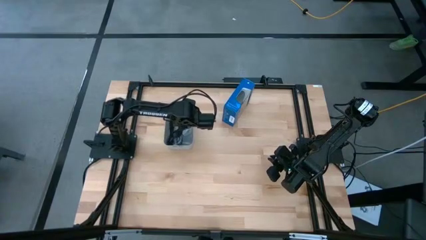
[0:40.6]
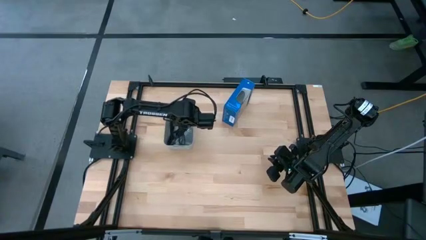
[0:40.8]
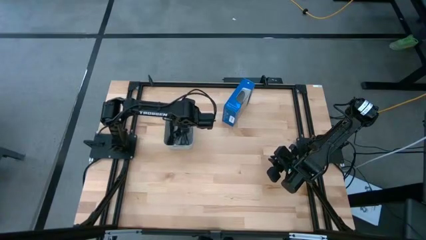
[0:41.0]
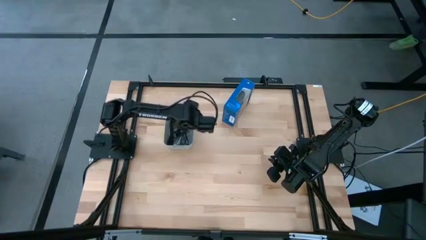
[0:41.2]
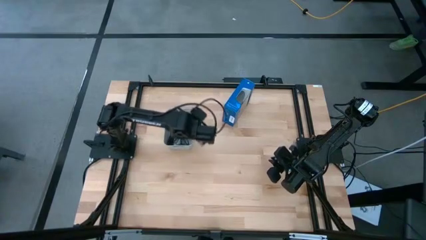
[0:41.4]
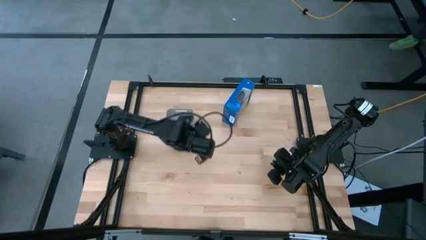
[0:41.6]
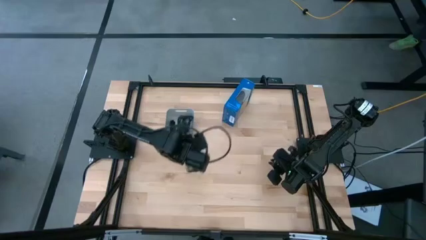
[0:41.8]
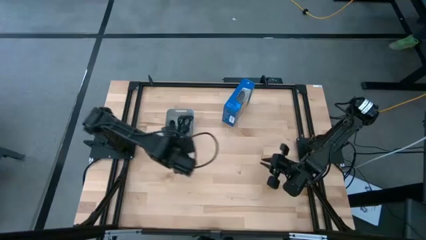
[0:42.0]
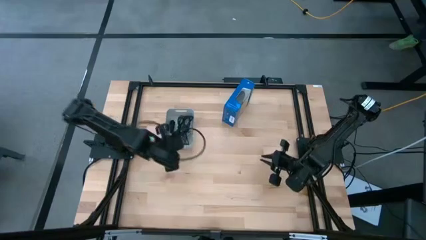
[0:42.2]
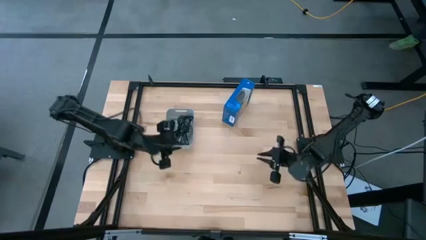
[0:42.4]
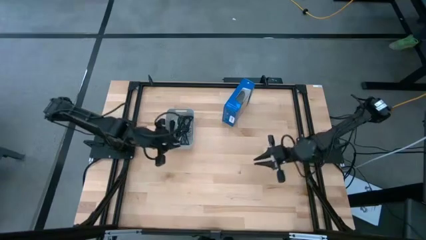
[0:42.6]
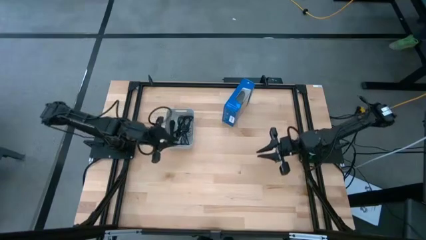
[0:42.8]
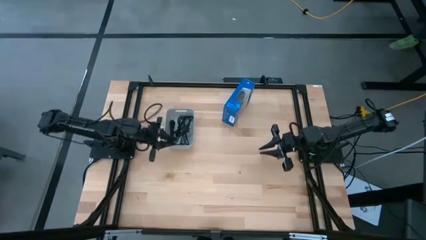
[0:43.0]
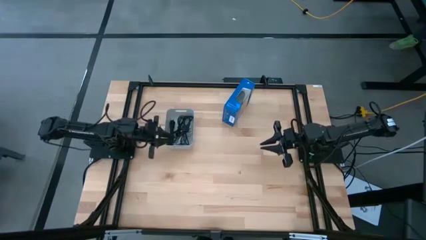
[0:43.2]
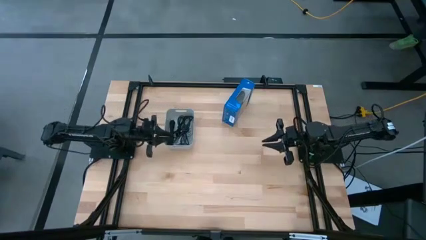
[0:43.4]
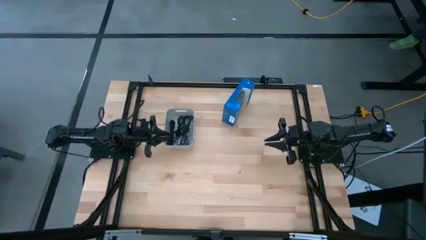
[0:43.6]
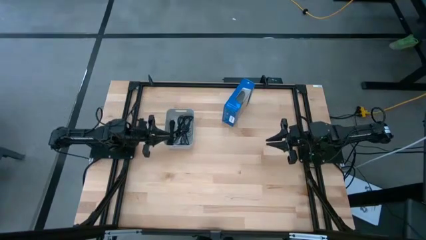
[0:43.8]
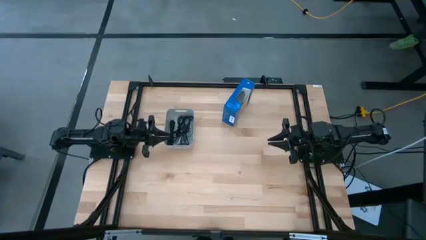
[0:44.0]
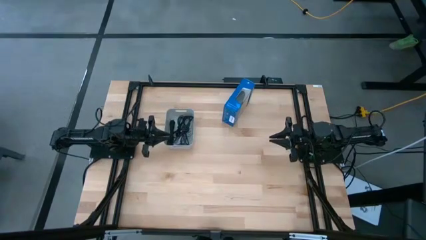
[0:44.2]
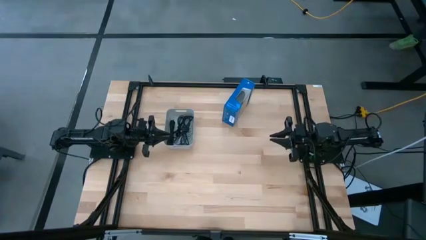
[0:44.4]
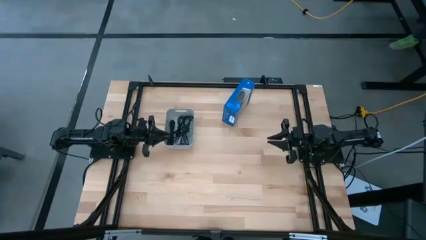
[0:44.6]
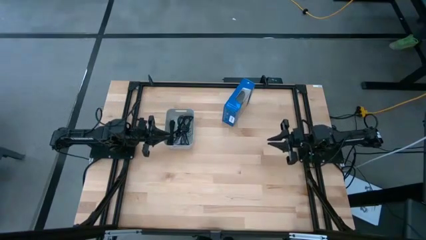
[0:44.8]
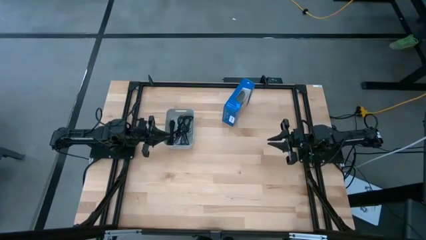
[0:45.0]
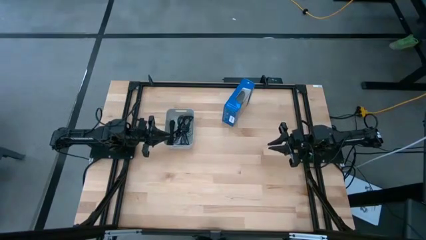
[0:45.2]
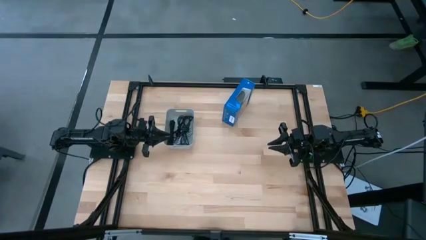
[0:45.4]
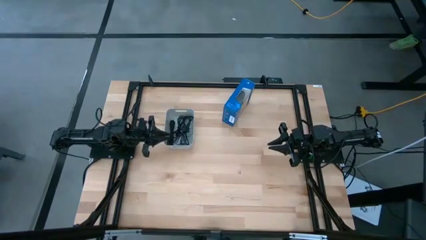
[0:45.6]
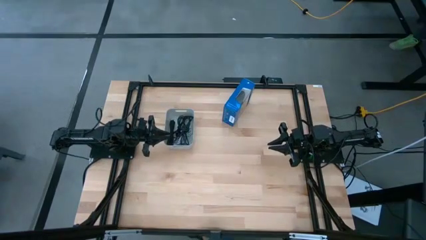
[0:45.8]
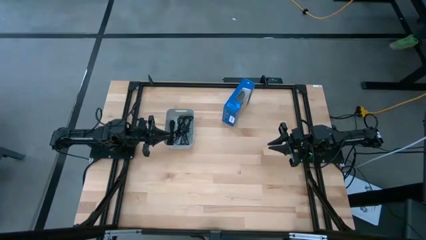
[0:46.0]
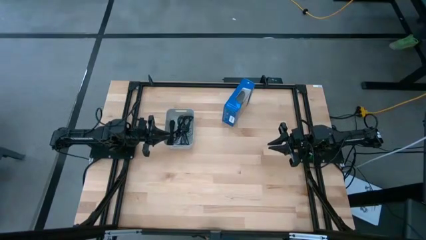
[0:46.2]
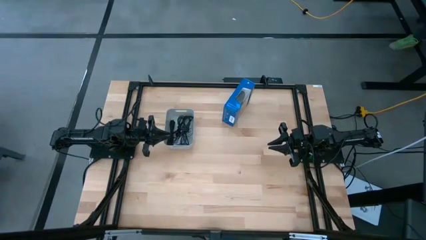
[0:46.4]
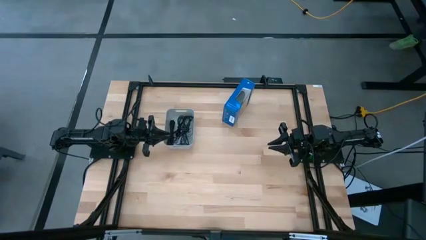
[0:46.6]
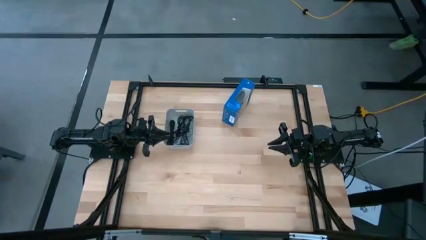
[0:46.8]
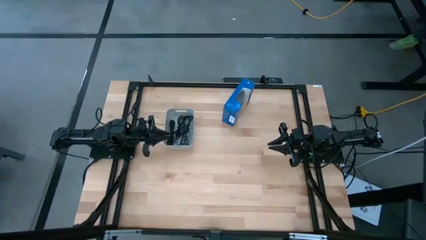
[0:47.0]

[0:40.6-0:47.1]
Task: Pick and place USB-C Cables
Return to Home Position

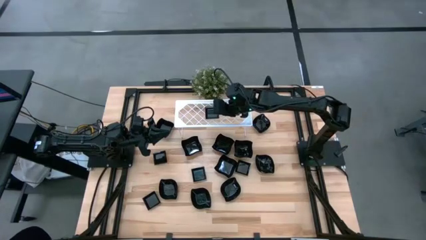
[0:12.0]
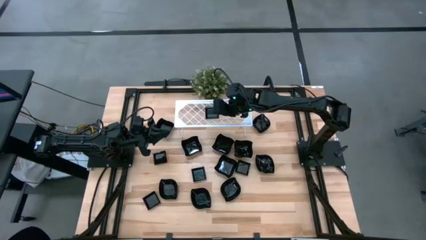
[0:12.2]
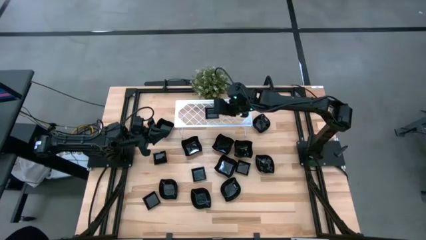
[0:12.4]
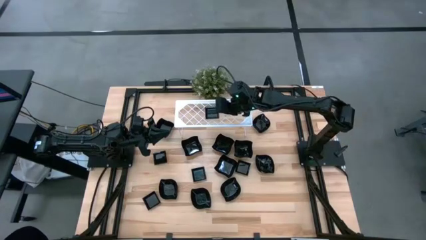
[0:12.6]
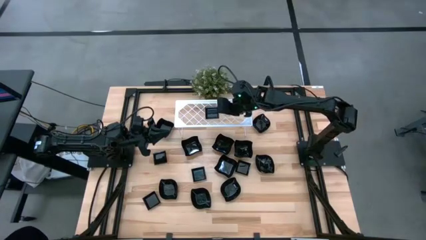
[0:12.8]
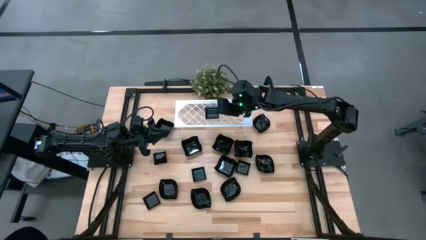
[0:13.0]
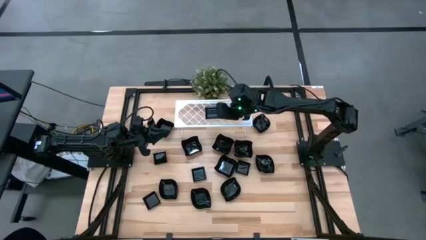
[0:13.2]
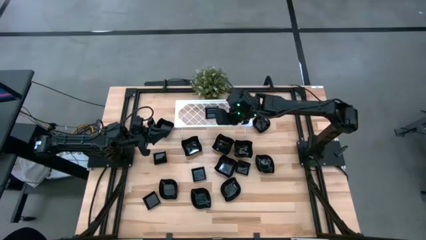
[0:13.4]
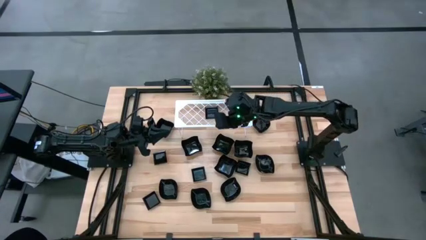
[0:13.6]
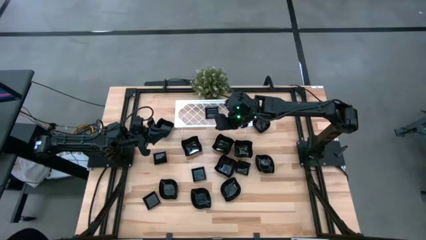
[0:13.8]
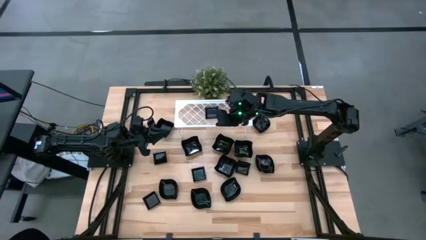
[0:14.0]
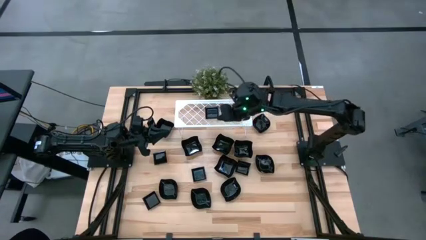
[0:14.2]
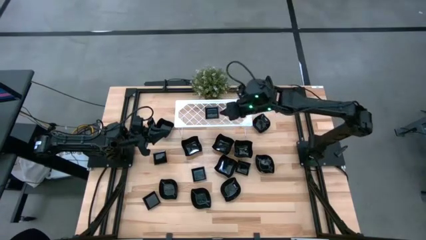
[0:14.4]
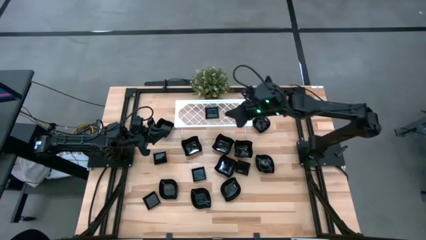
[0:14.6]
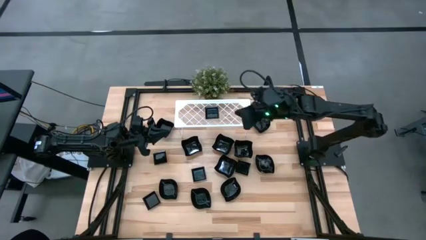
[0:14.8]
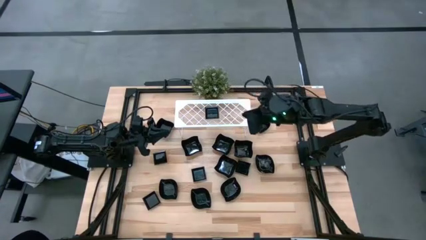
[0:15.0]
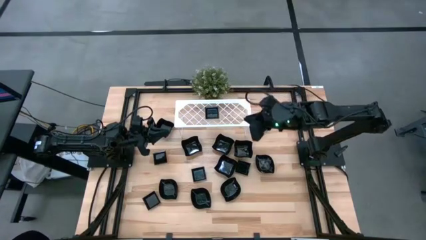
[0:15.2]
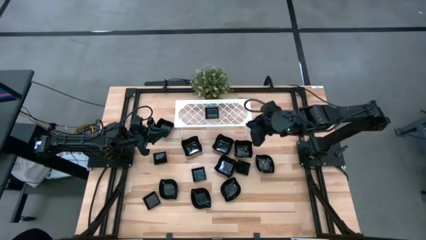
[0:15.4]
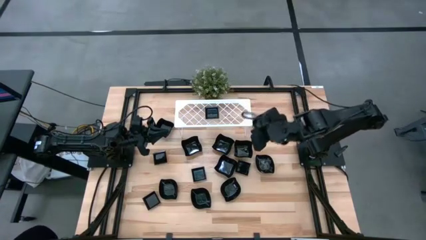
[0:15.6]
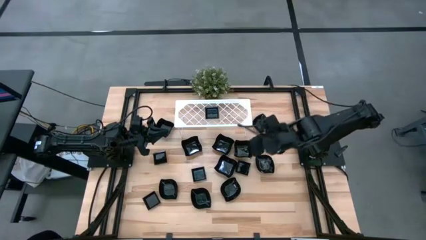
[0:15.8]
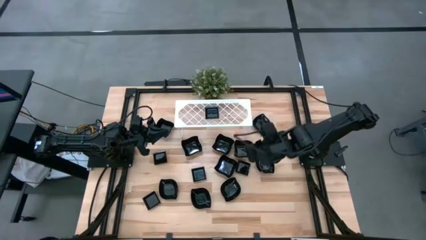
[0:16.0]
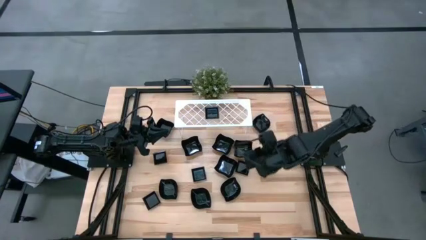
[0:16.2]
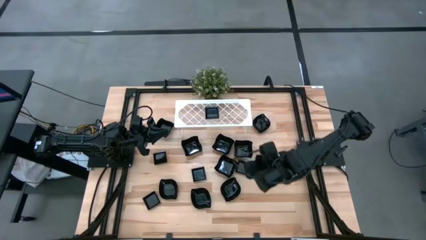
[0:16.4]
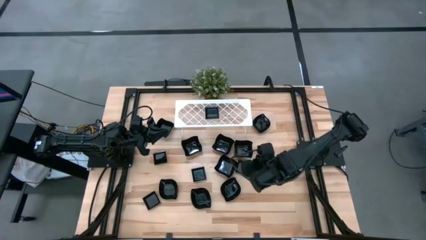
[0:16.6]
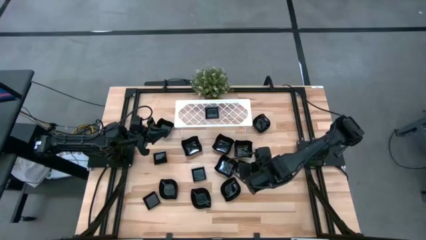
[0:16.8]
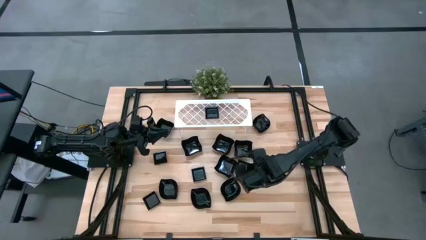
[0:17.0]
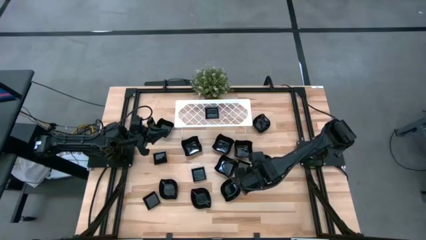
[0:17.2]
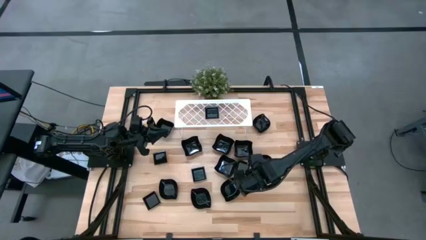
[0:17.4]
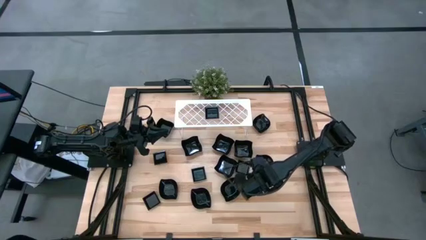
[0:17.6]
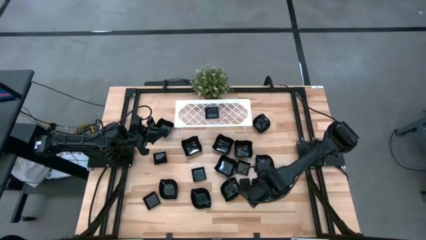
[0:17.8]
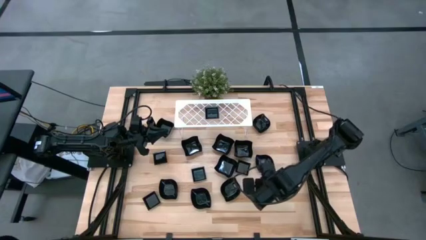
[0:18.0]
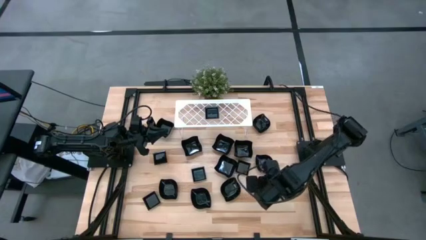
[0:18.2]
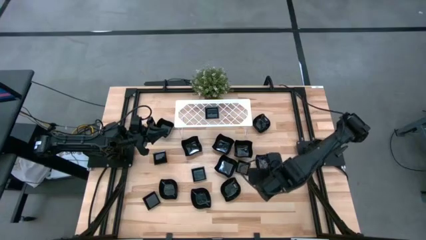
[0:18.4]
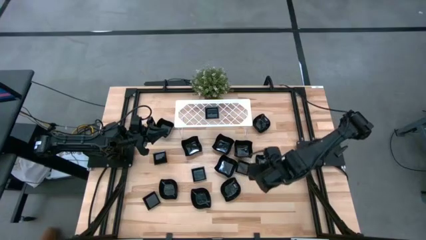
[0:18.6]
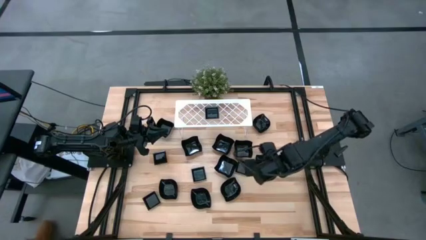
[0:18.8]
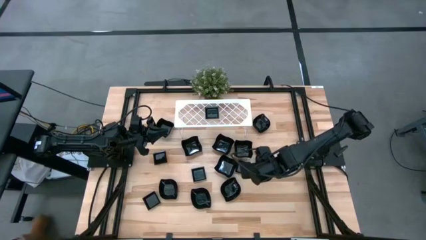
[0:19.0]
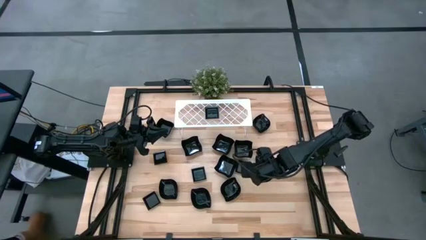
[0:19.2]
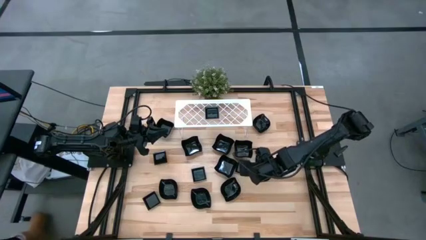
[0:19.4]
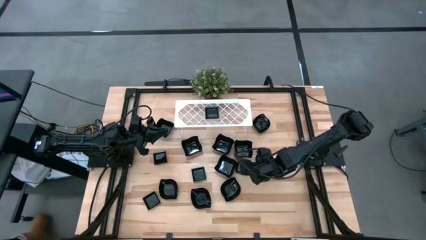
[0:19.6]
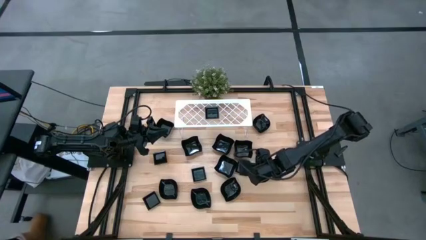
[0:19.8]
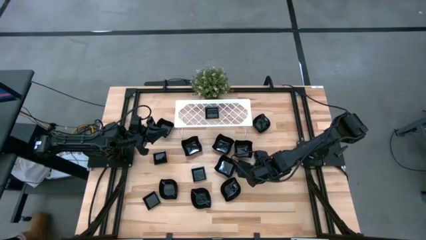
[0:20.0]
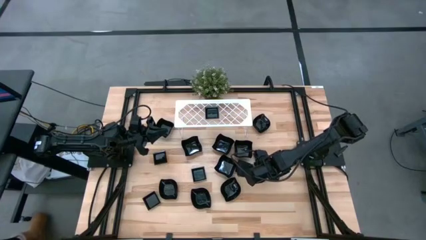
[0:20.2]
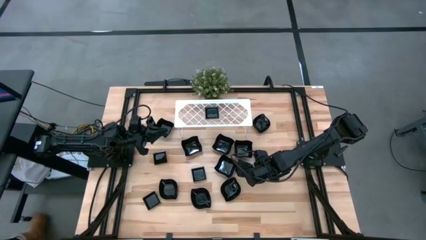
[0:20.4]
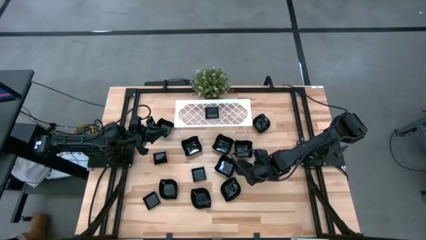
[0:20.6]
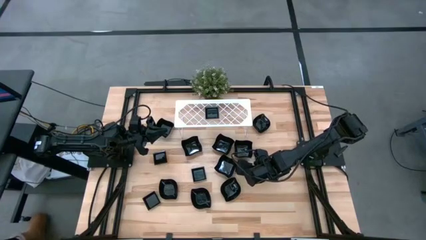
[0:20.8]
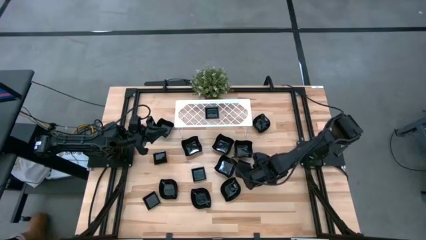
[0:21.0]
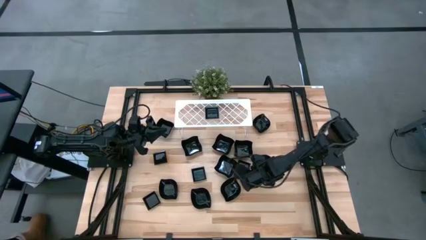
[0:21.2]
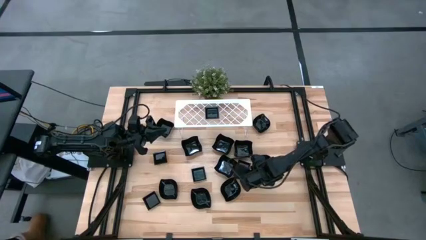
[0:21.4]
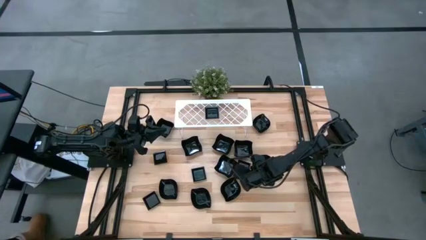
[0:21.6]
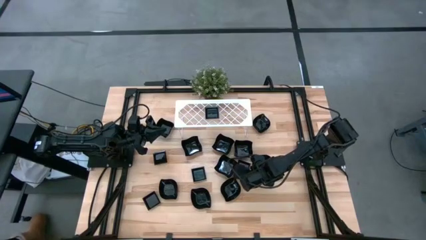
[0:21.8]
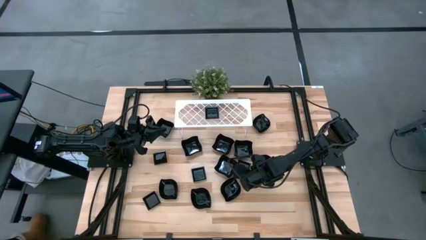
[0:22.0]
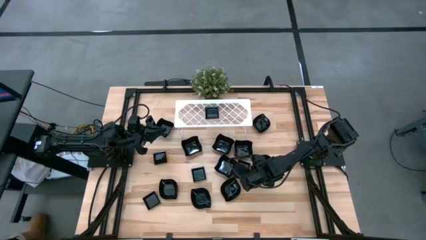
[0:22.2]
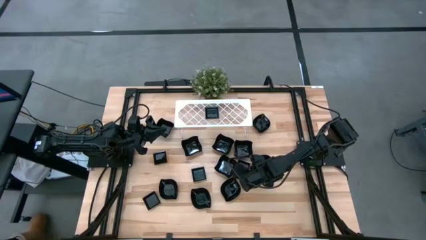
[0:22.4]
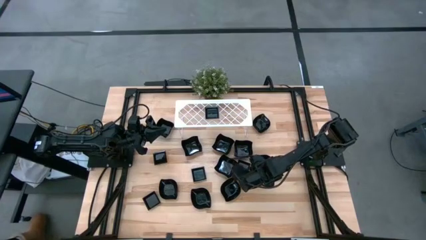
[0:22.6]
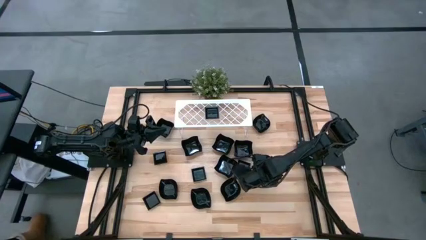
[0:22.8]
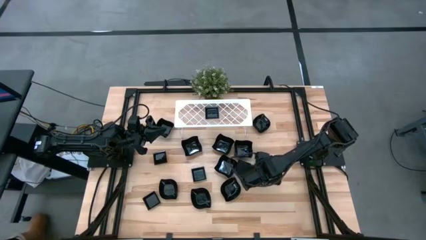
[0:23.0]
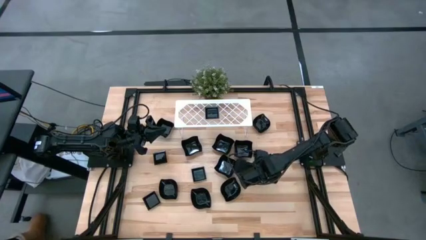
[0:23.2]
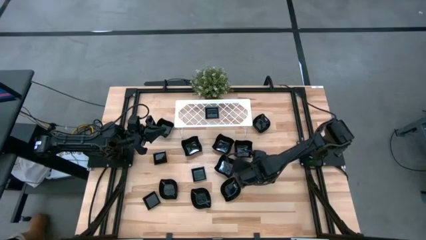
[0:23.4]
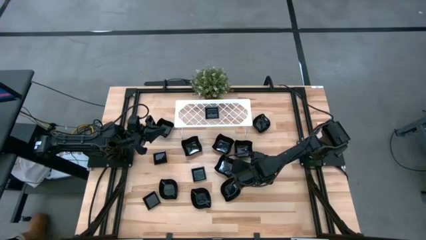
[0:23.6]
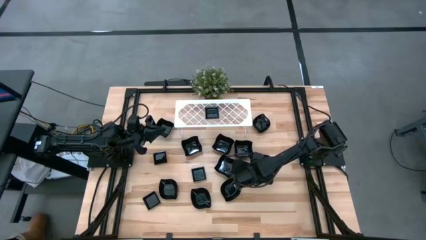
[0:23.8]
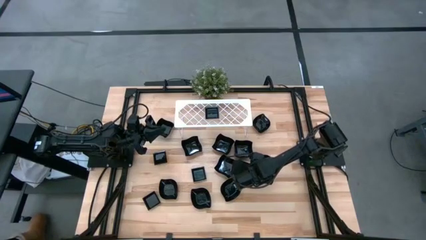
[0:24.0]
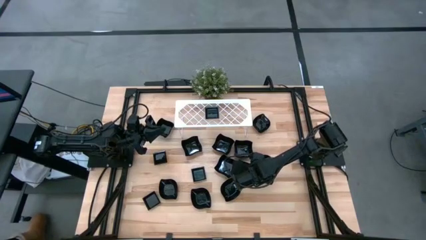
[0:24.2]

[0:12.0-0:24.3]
Task: Pick & Place Mini shaped plates
Stack the square plate on top of the square plate on the shelf
